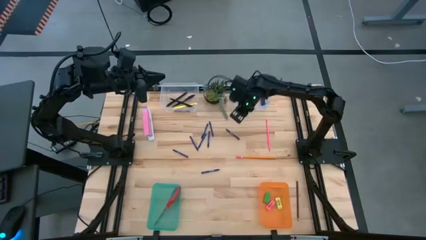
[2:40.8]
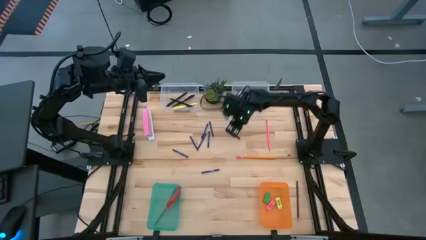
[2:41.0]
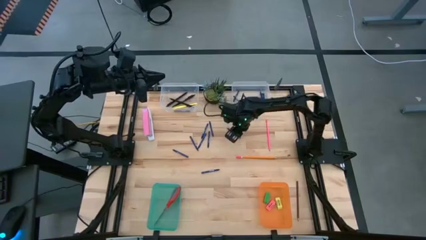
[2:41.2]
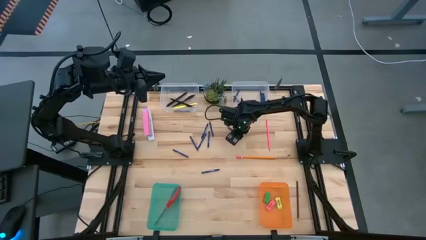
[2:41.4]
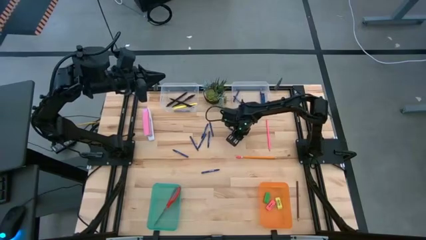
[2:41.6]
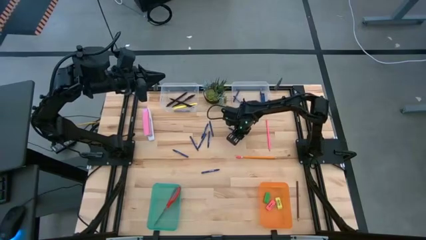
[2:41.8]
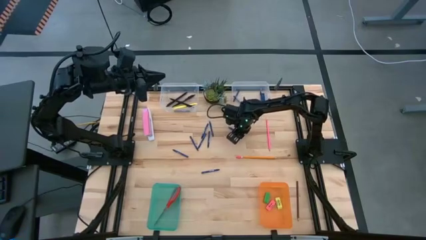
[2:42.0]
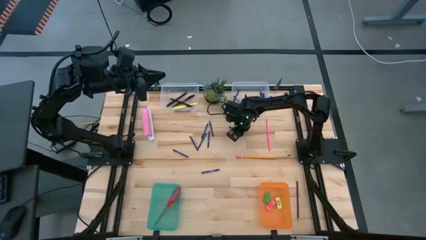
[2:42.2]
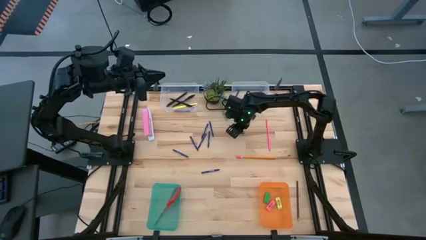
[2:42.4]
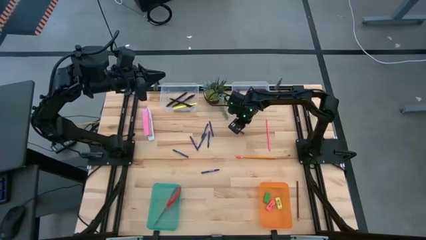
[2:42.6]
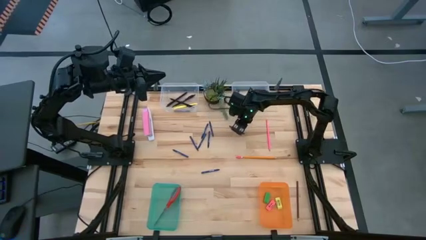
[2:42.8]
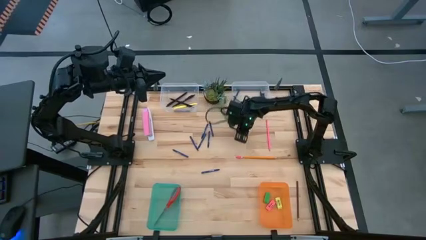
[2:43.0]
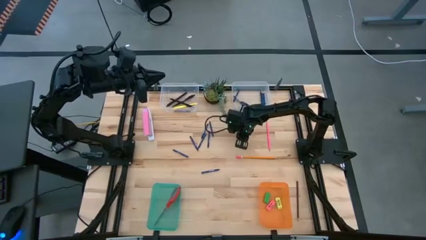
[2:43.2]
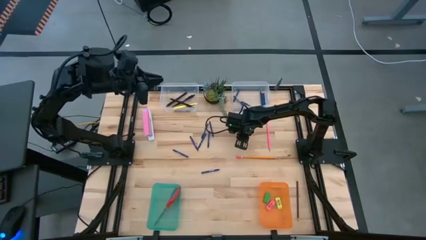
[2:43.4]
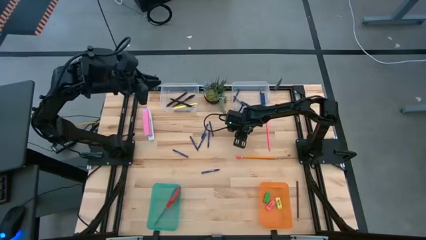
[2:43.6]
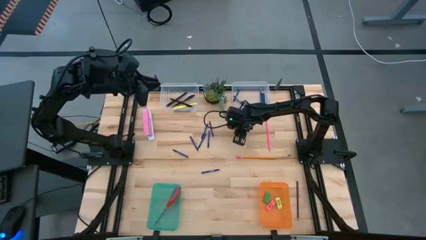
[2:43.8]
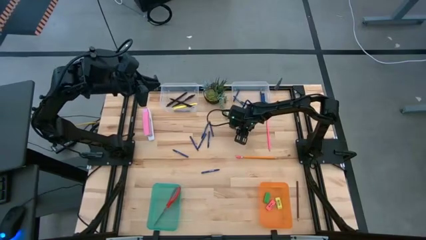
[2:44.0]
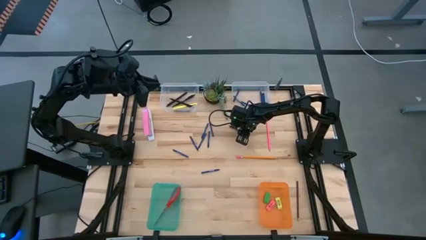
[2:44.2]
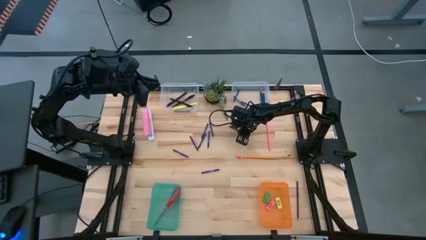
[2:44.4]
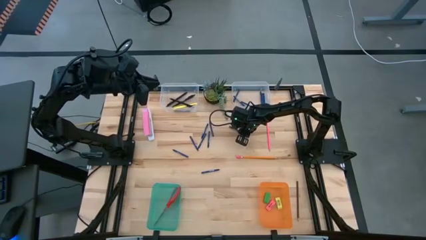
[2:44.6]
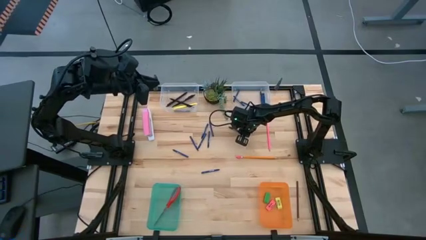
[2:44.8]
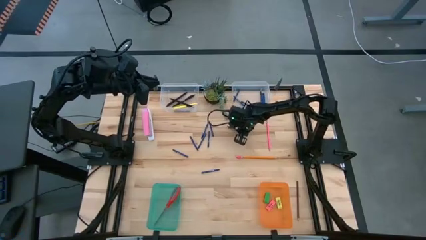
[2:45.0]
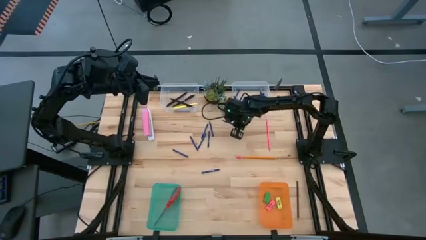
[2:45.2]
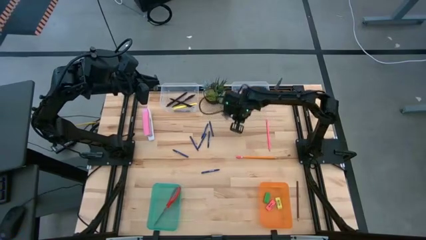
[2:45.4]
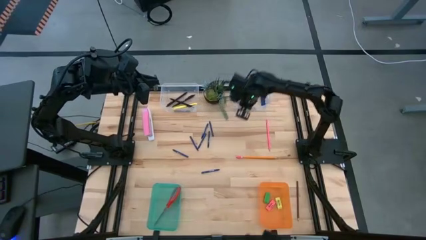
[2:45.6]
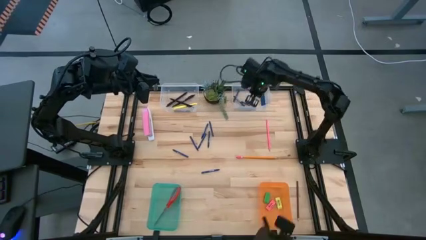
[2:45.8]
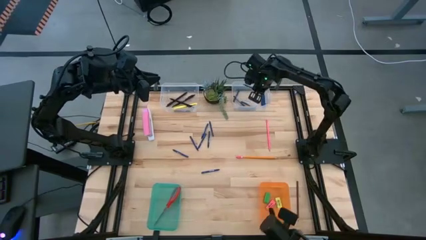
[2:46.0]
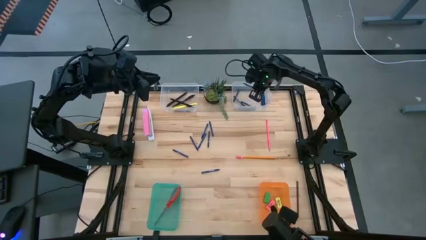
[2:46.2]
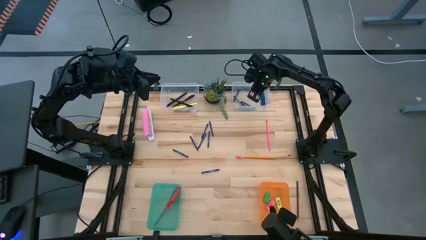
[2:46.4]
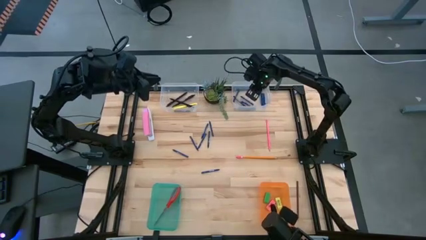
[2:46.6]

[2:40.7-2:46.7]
Task: Sort crayons/erasers/pens/pencils in bins
Put the blue crayon into the right transparent bin

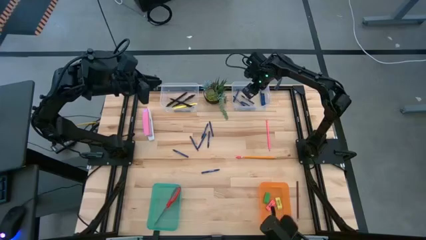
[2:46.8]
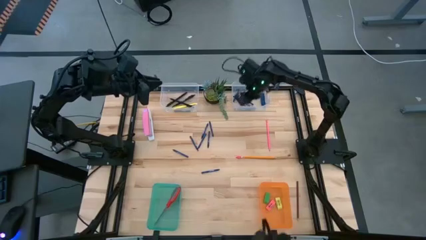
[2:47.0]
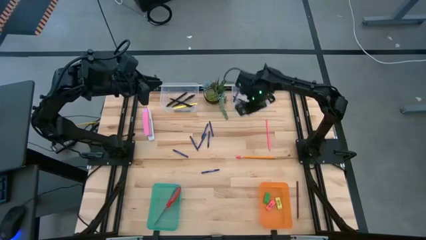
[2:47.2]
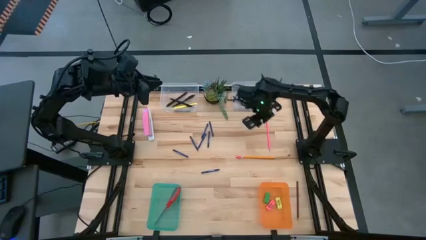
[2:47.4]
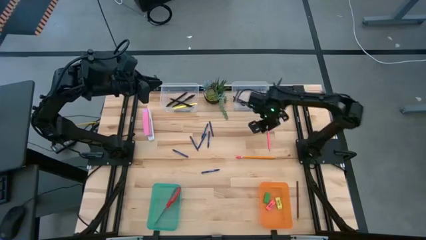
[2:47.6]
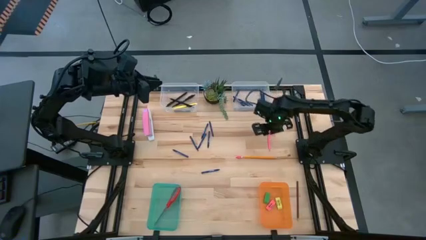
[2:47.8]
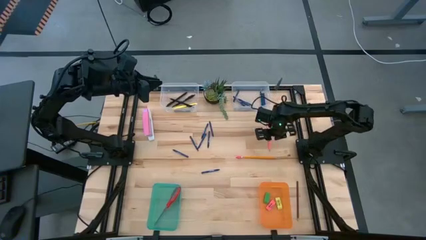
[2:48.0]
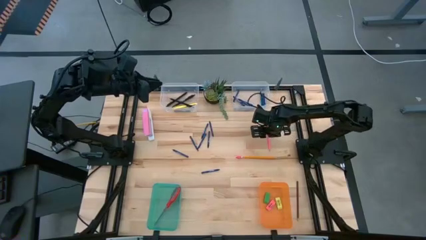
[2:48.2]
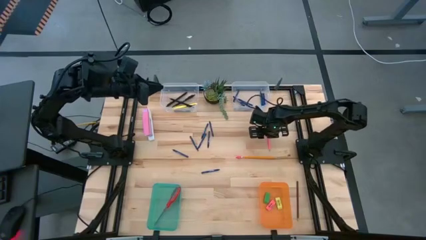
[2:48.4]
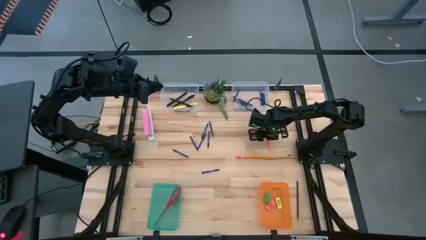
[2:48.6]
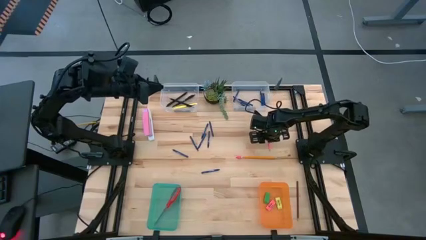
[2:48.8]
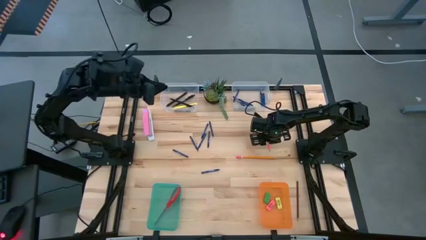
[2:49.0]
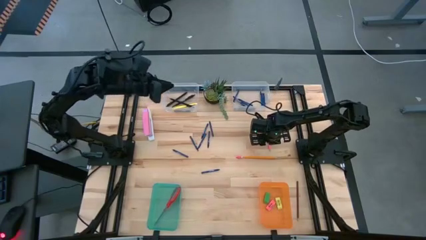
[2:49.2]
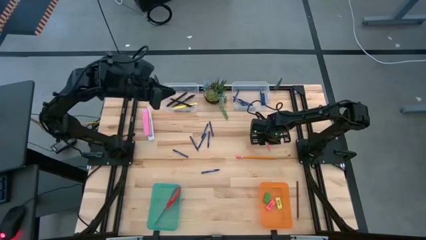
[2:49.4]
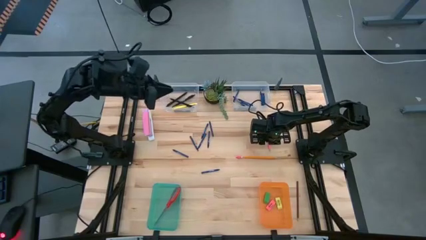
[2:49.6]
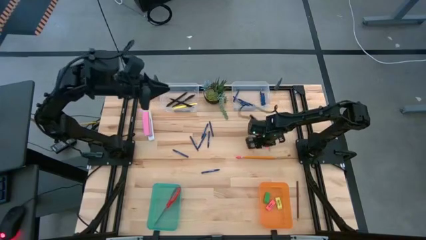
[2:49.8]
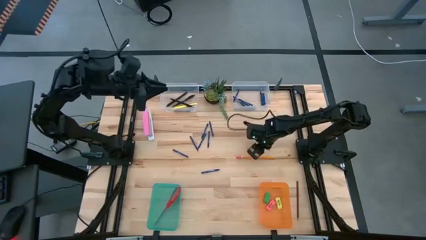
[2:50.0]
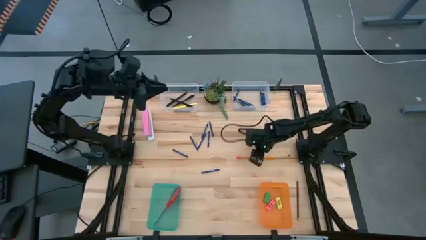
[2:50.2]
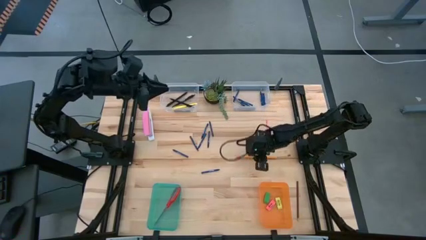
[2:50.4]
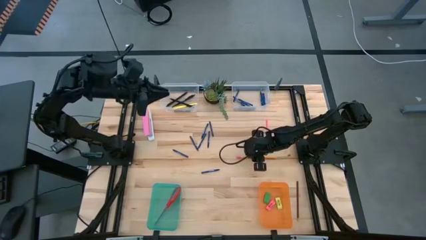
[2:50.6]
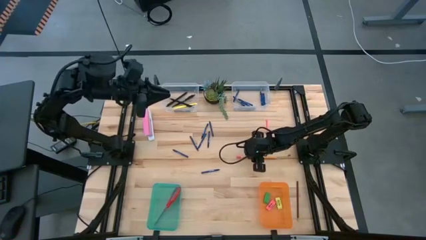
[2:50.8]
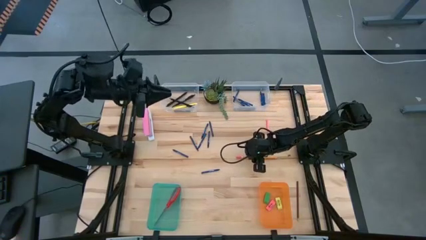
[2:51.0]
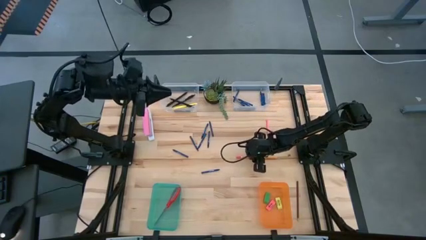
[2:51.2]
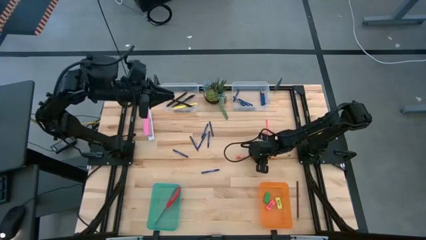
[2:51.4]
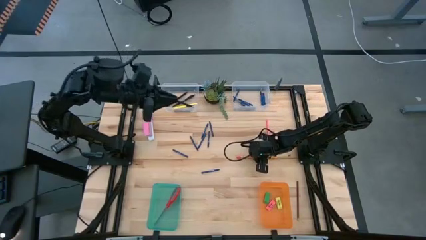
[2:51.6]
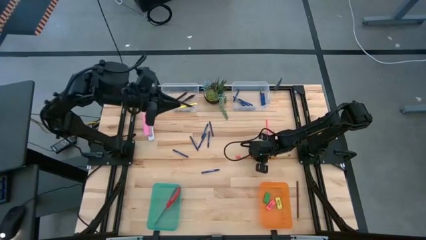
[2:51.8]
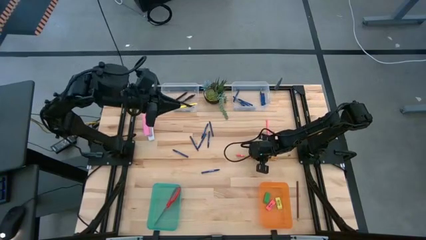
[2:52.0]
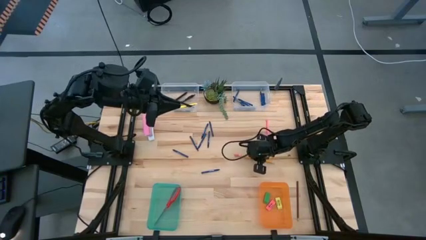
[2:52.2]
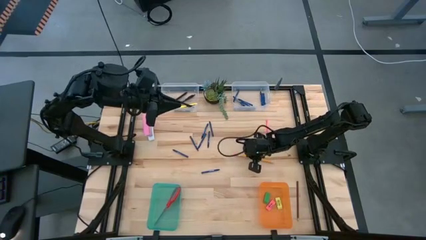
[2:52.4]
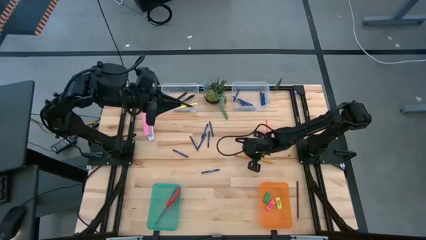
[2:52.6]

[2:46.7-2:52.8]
Put the yellow pencil into the right transparent bin

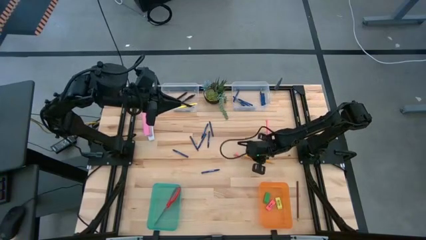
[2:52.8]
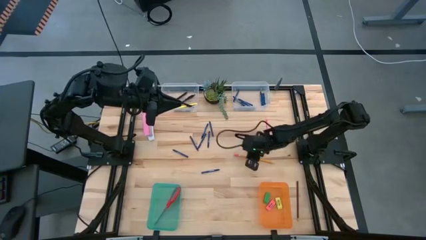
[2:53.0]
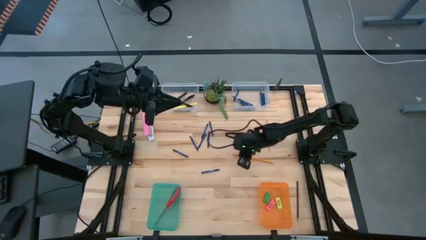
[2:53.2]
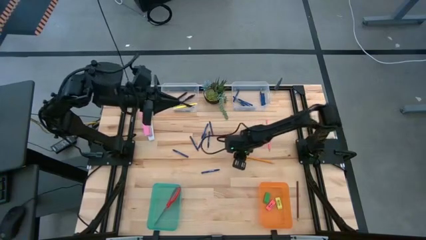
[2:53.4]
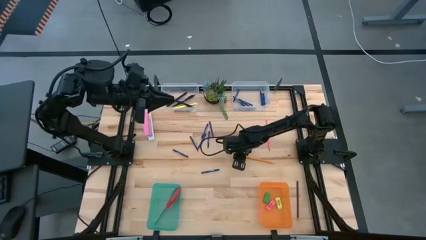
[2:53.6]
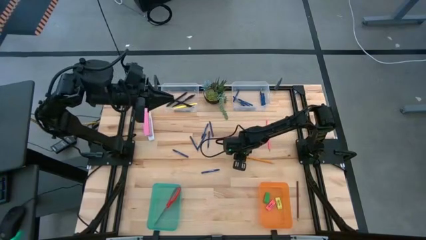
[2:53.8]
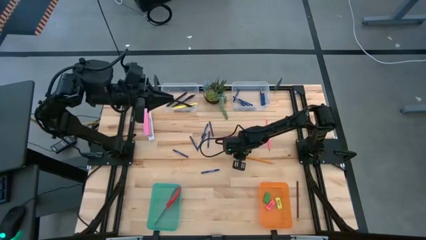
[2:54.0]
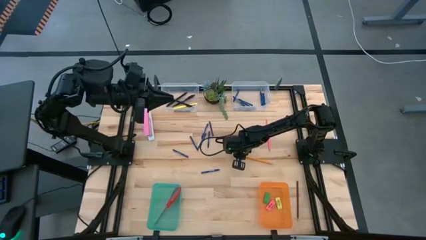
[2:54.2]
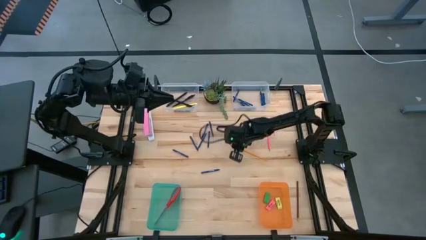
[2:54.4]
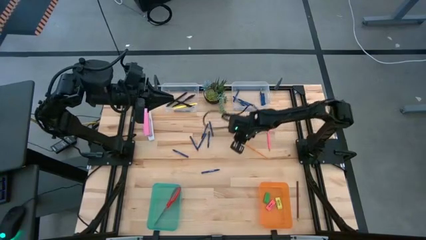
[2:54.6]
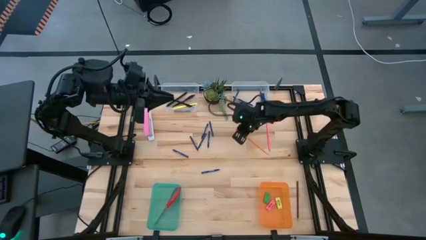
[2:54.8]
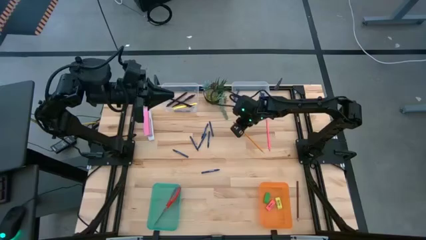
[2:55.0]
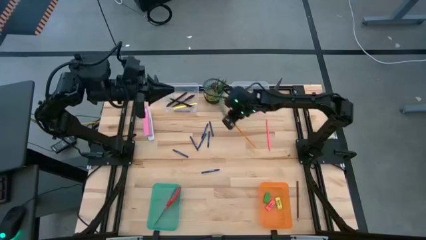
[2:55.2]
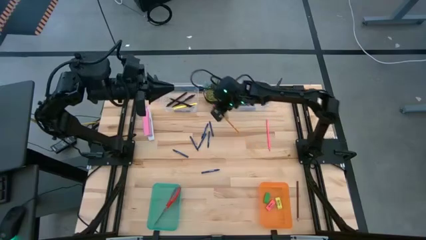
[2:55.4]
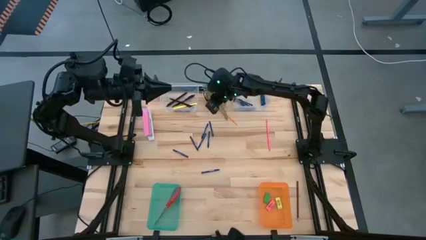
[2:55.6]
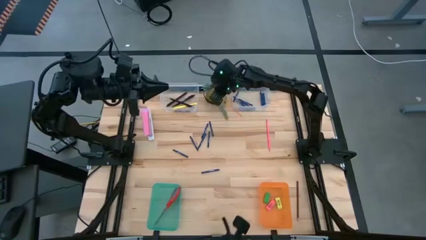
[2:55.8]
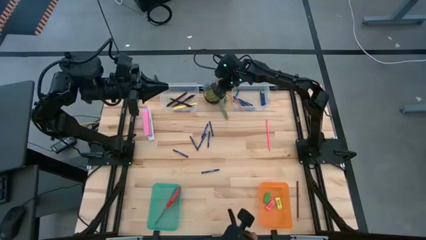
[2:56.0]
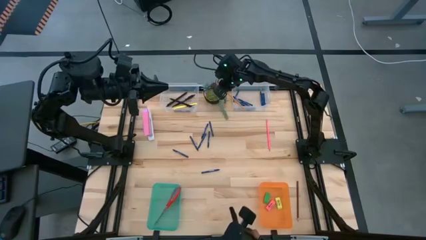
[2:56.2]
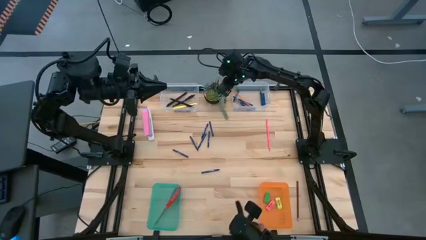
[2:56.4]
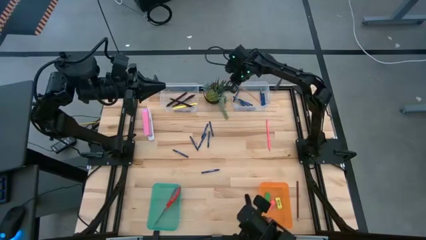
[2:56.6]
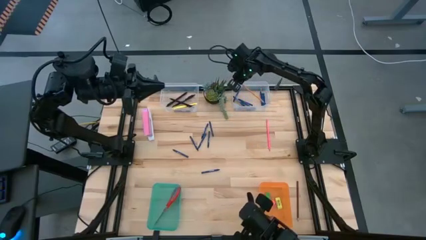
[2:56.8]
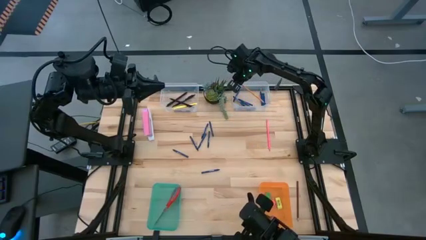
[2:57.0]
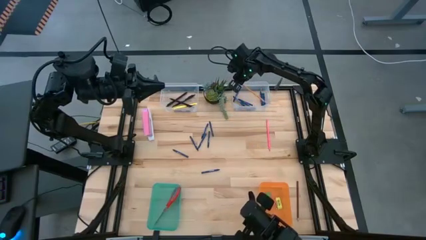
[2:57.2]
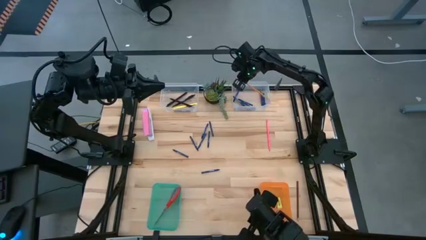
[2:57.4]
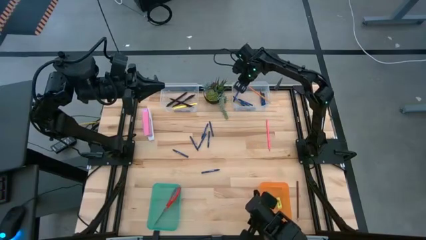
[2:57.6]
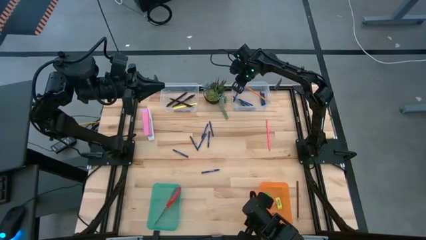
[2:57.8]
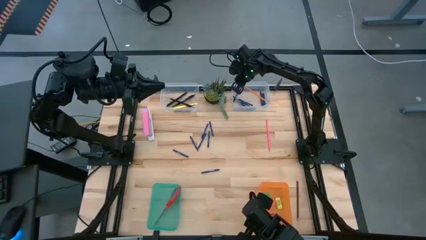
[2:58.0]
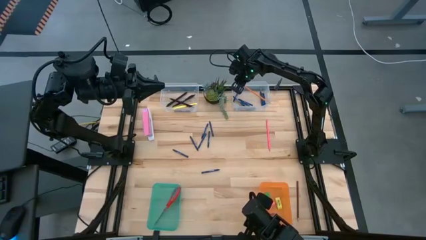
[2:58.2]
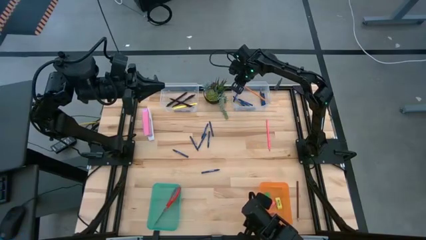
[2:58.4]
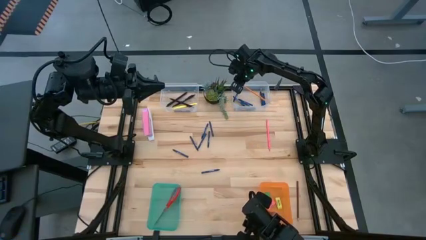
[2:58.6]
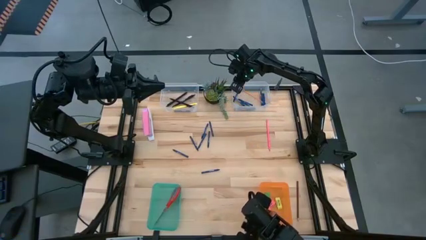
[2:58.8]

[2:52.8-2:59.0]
Put the yellow pencil into the right transparent bin
